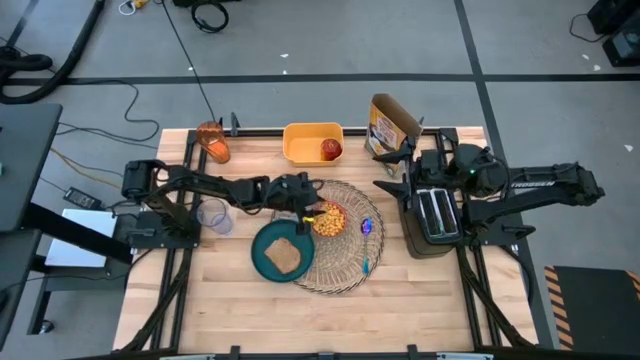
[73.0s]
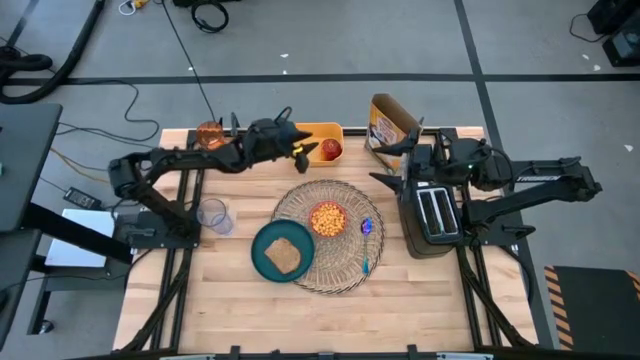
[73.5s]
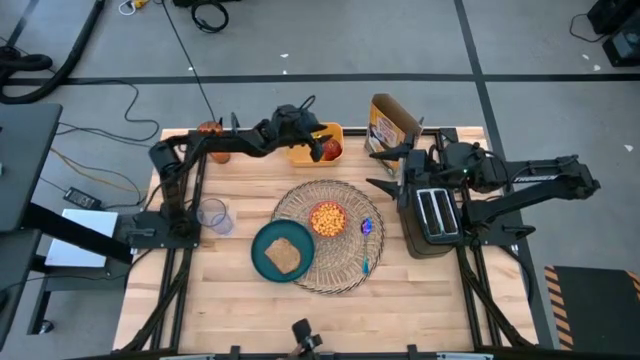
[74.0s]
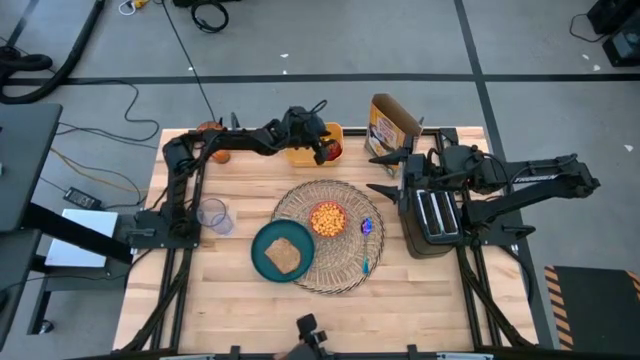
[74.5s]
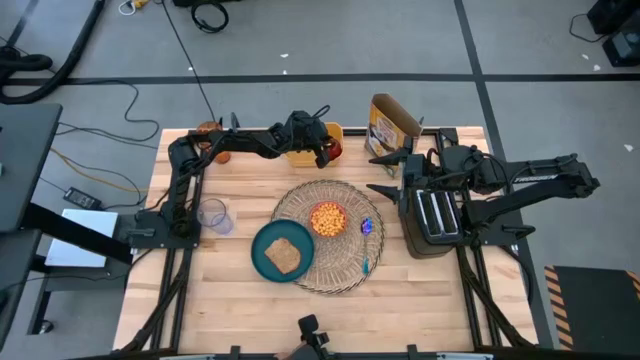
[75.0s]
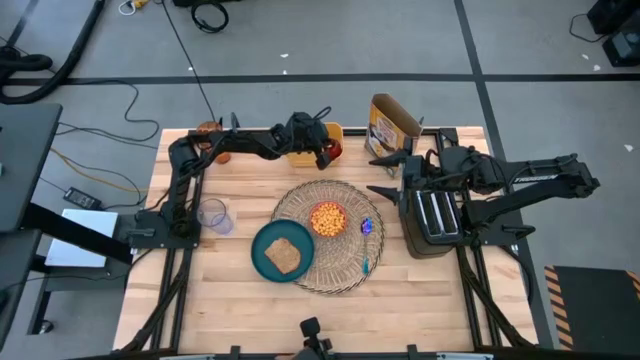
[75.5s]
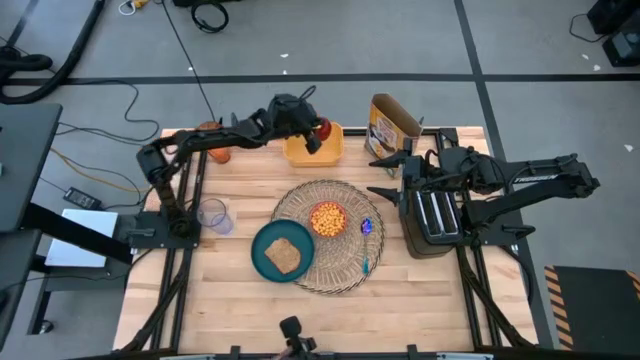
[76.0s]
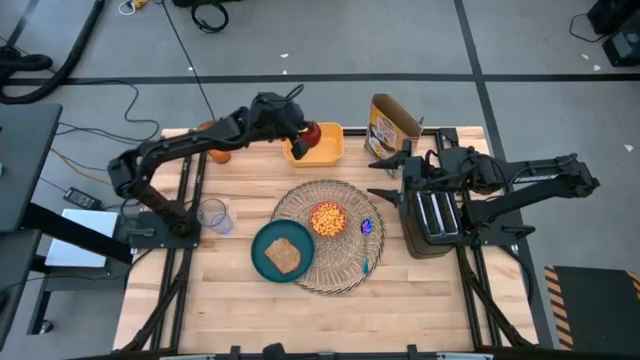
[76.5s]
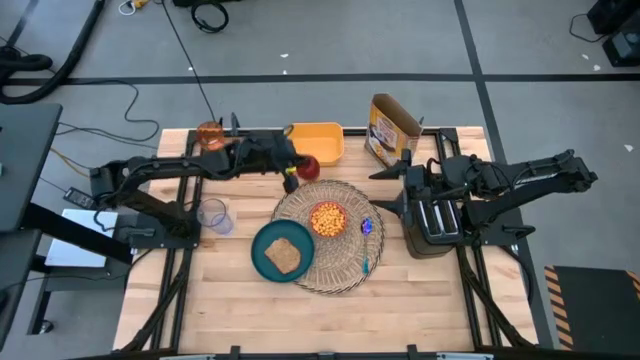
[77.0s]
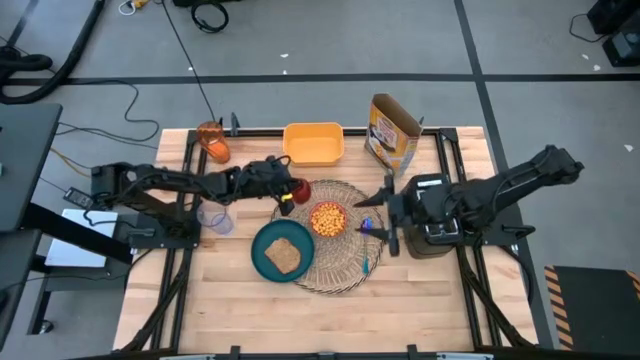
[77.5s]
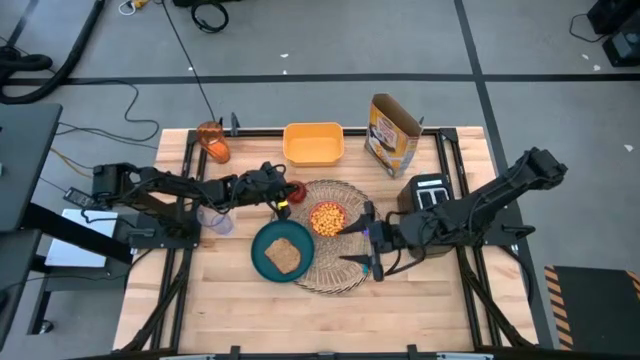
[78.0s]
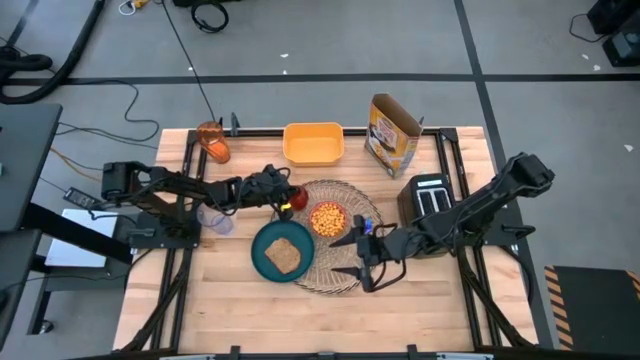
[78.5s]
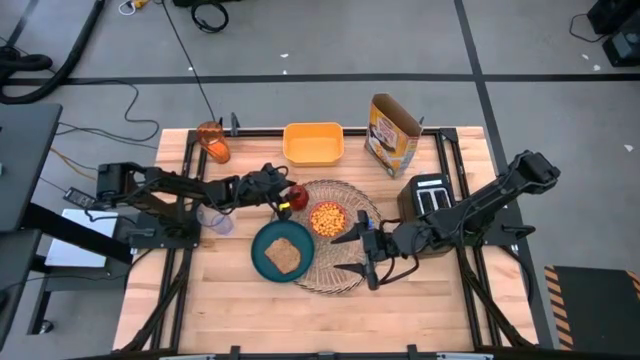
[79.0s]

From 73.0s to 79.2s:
Task: Arrange a breakfast setting
Put the red apple on the top left of the brown table mat

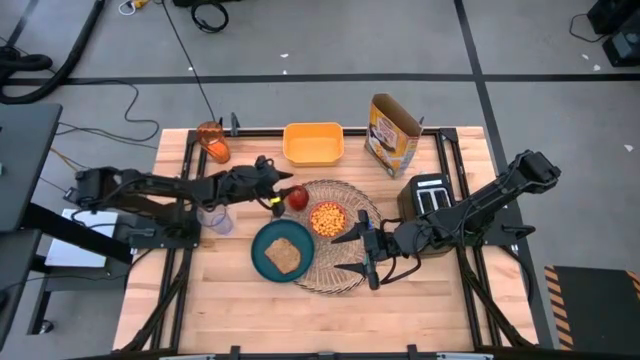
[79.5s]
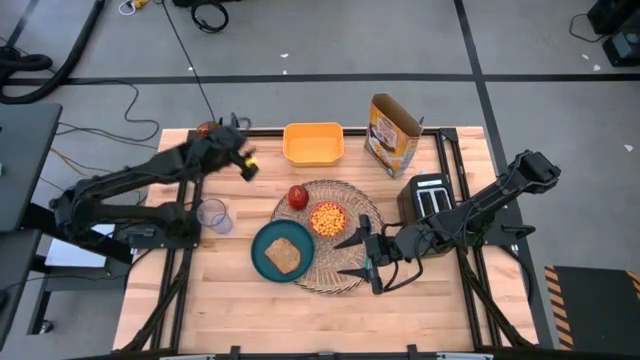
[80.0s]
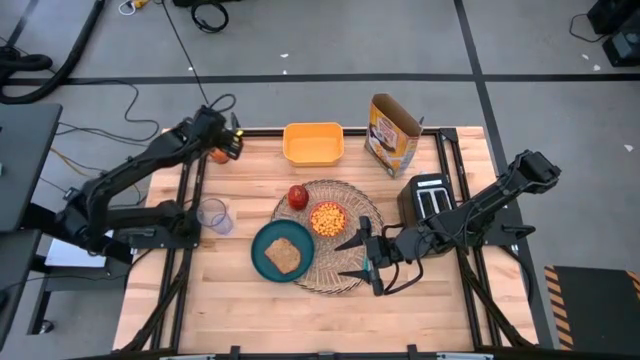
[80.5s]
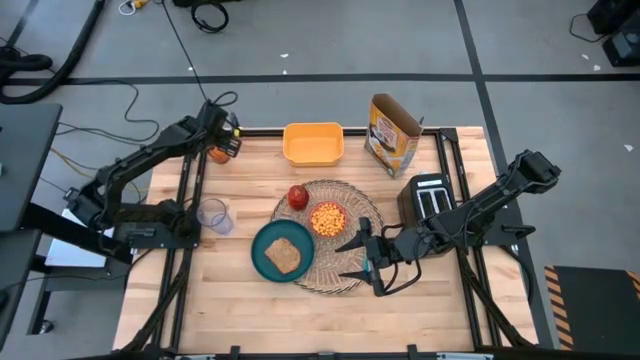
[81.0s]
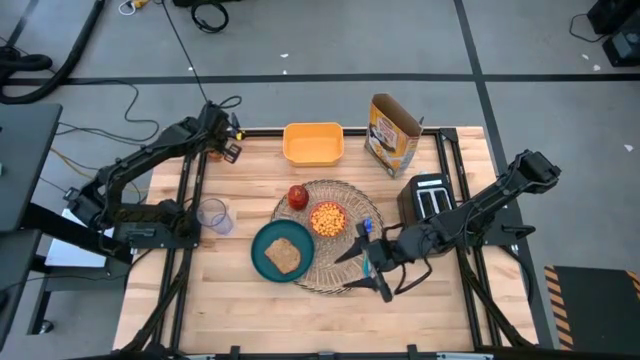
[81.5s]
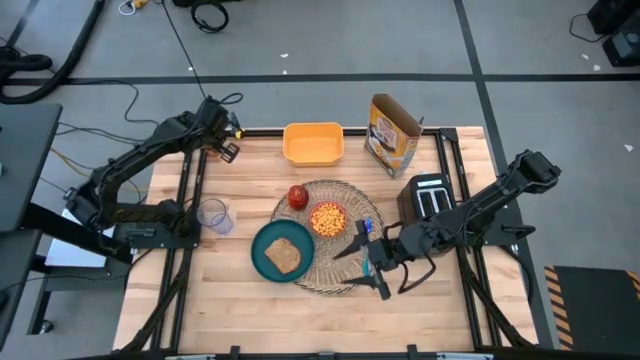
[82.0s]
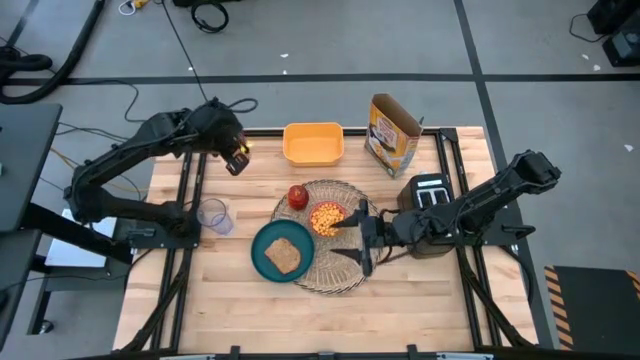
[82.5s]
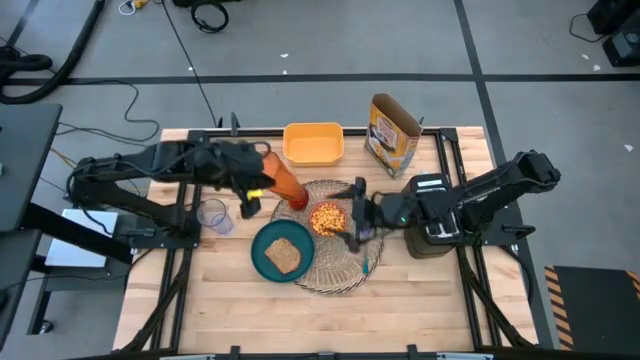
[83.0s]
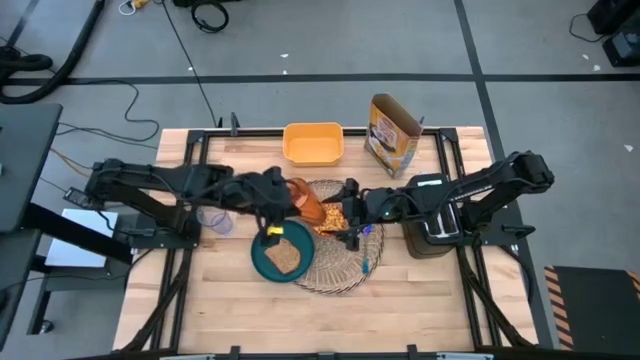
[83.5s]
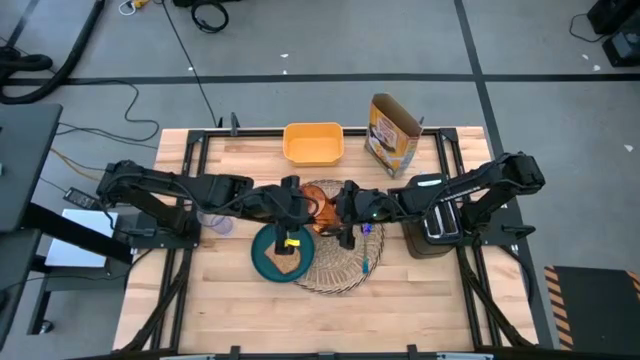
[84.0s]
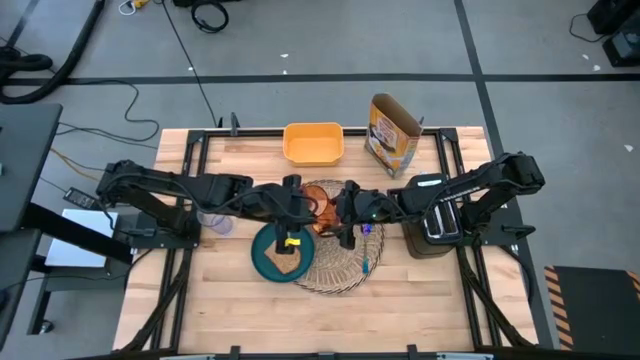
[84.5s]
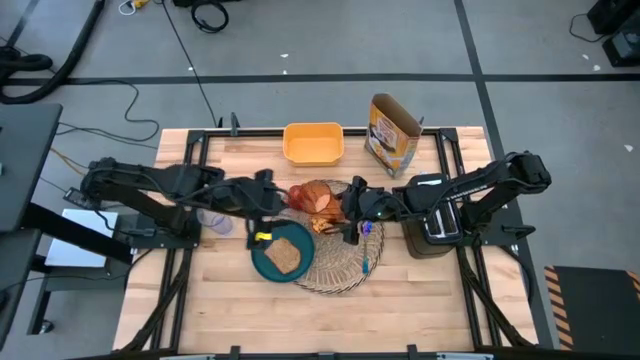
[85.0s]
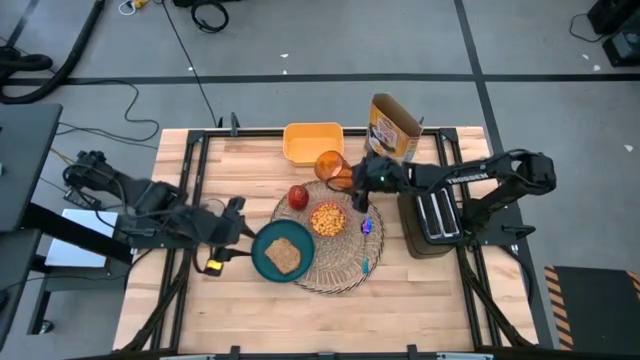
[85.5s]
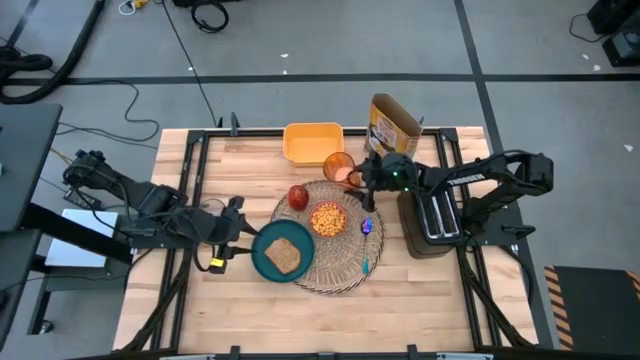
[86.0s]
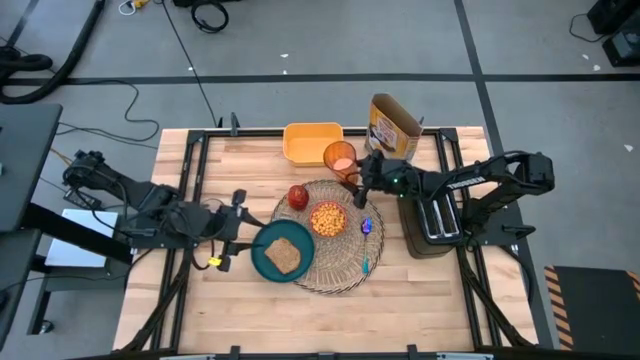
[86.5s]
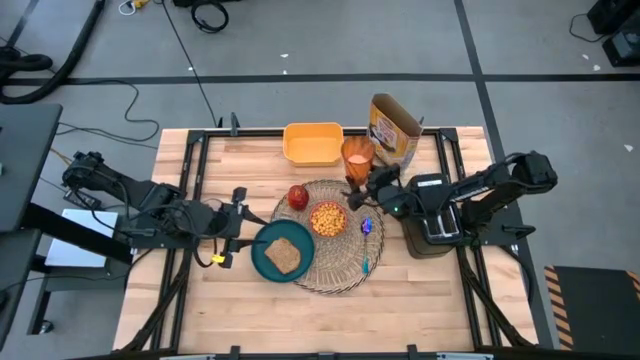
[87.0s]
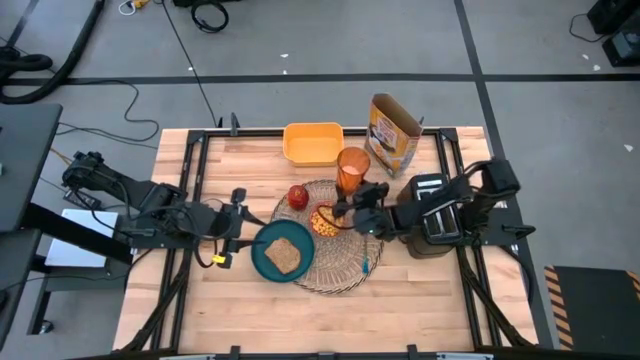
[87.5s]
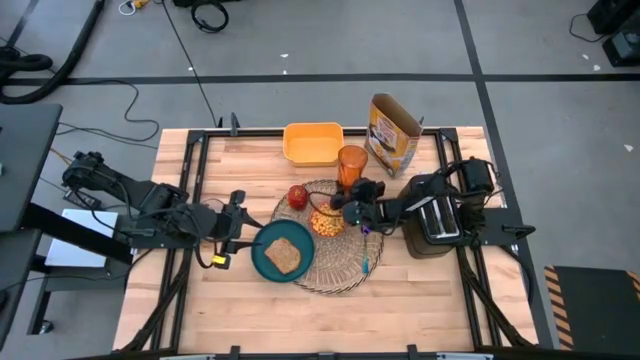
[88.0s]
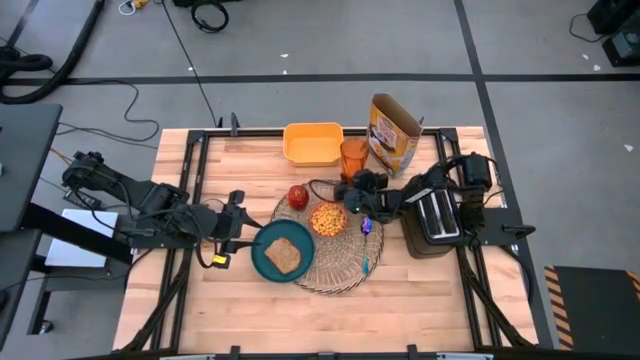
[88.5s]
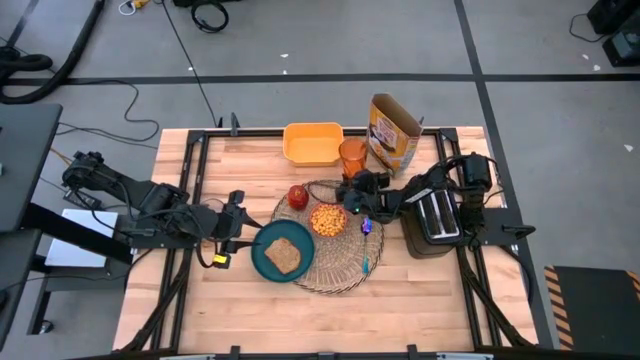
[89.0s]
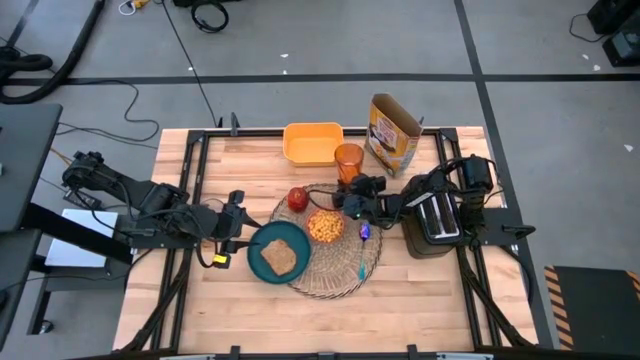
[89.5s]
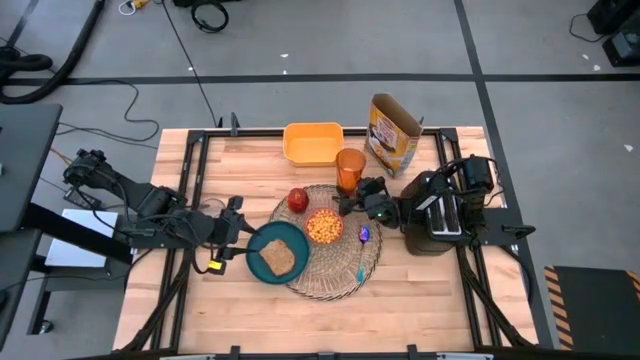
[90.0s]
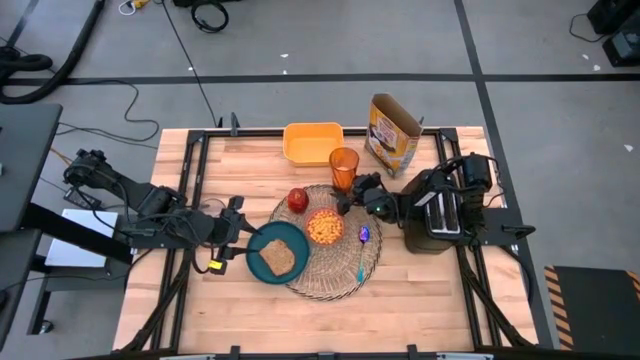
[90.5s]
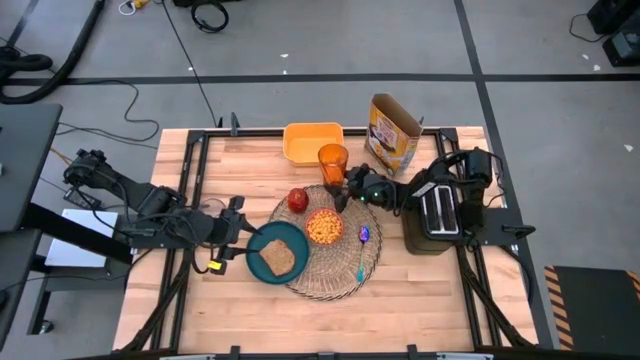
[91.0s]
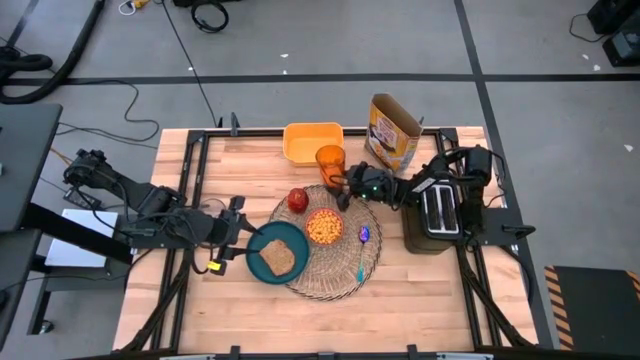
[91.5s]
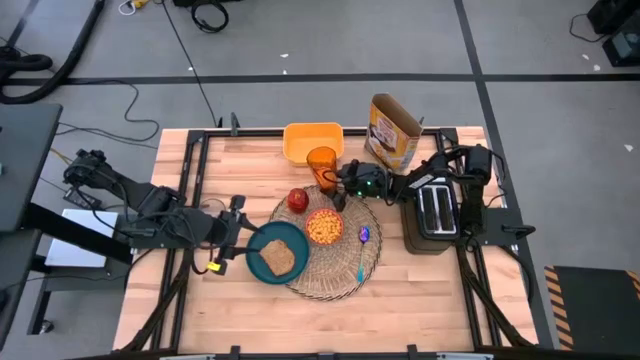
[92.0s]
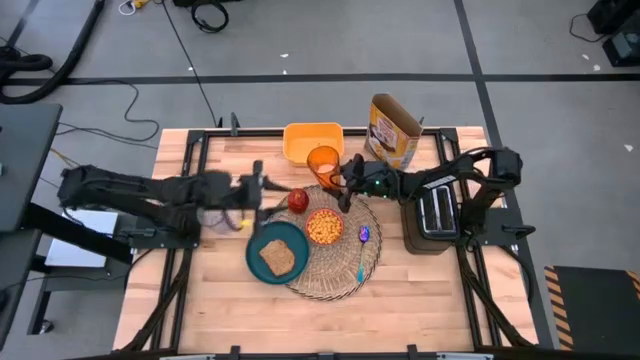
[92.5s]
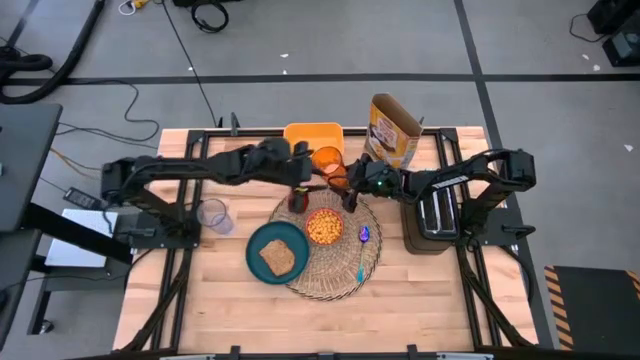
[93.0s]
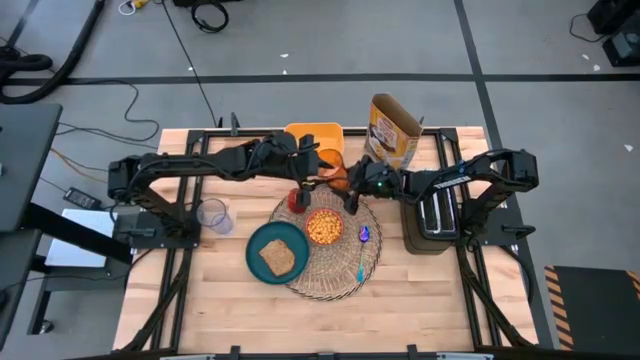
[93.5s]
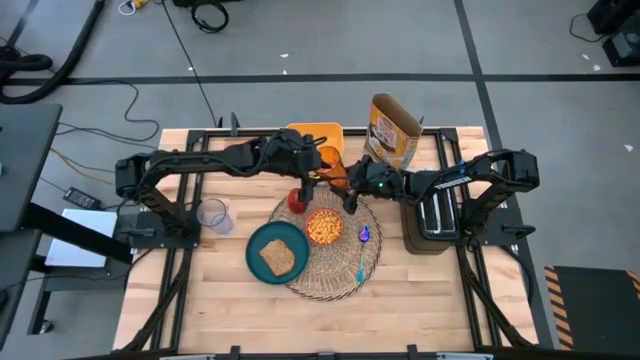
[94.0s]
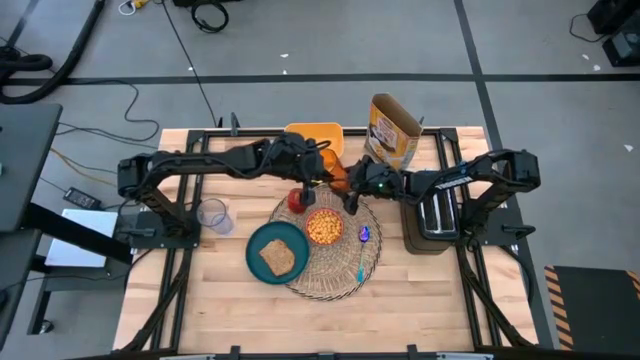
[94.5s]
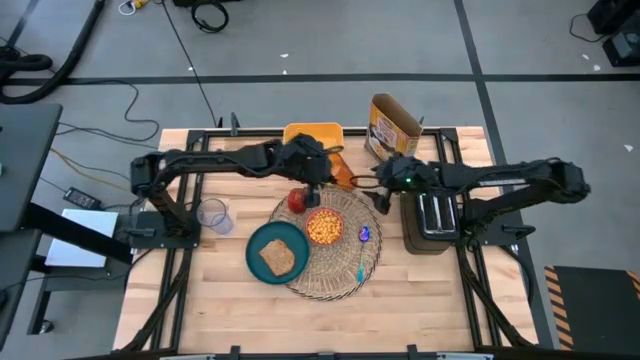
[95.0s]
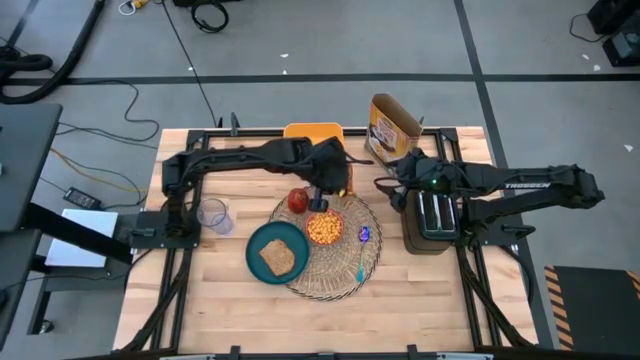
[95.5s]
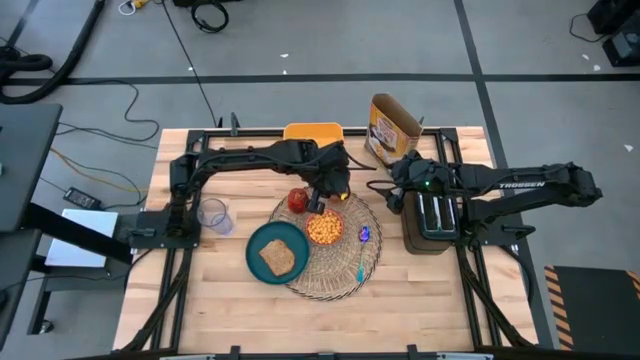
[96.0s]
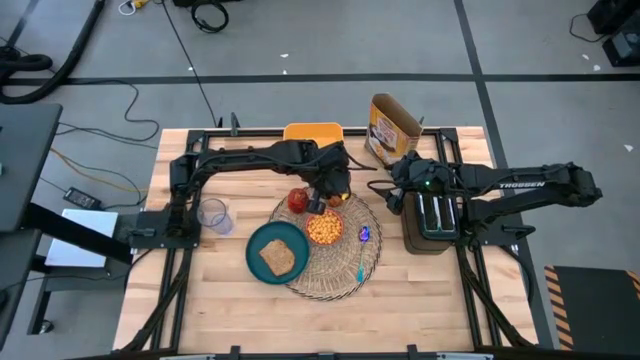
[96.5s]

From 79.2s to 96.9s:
Put the brown cup of milk to the top right of the brown table mat
